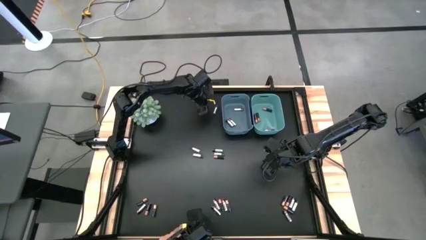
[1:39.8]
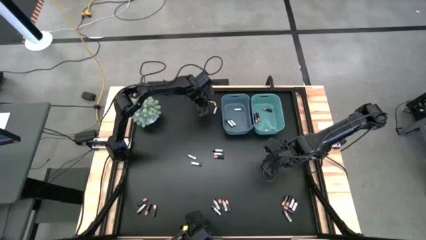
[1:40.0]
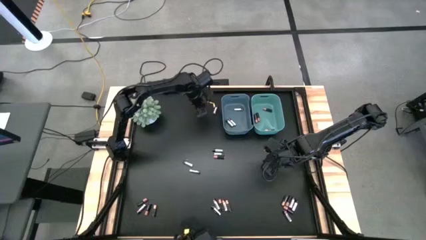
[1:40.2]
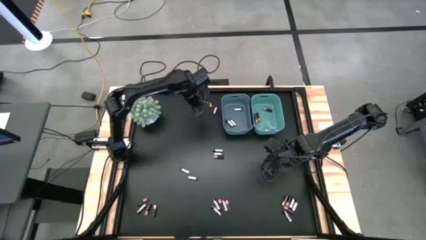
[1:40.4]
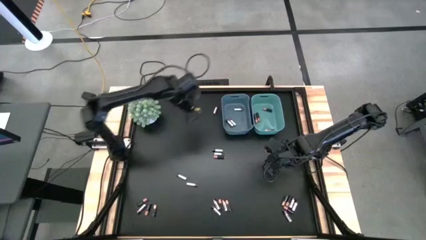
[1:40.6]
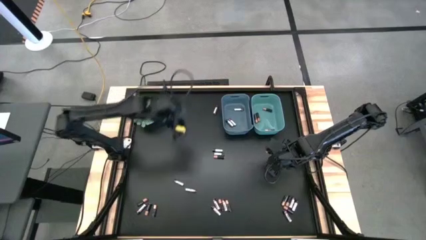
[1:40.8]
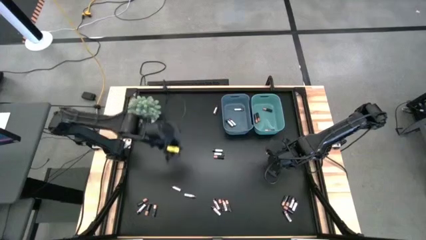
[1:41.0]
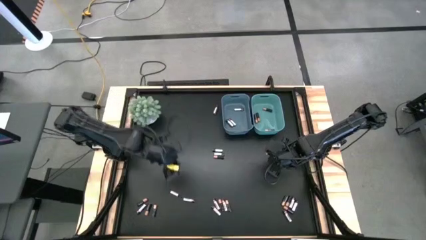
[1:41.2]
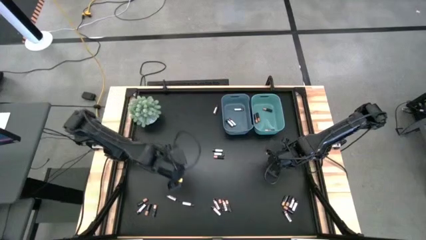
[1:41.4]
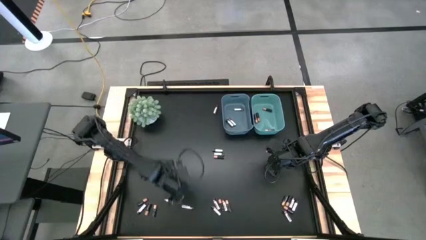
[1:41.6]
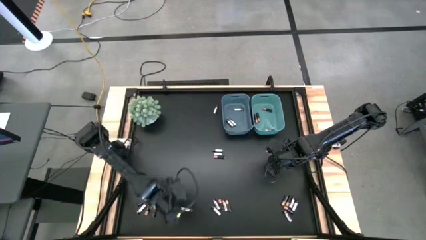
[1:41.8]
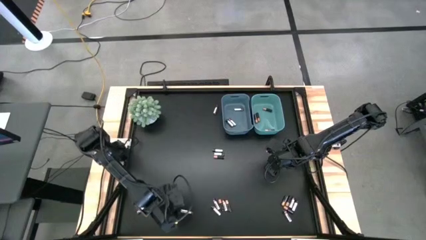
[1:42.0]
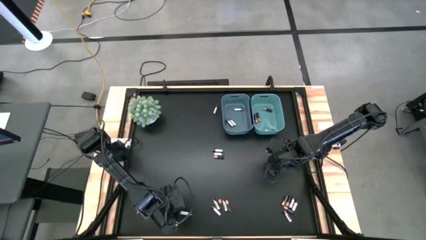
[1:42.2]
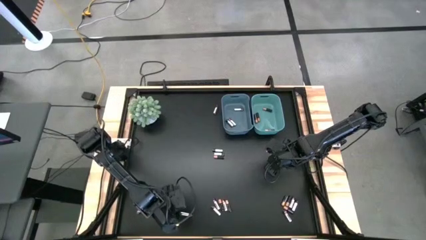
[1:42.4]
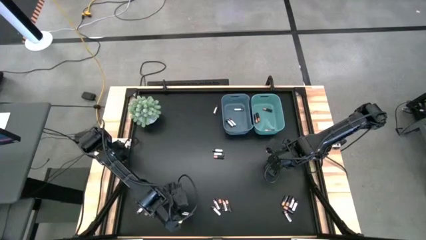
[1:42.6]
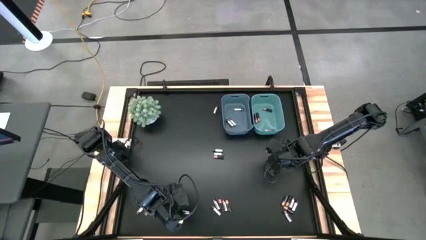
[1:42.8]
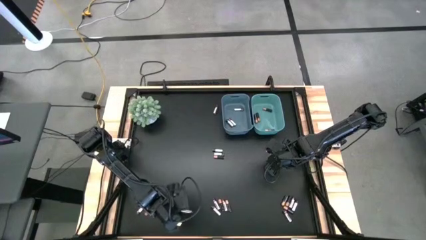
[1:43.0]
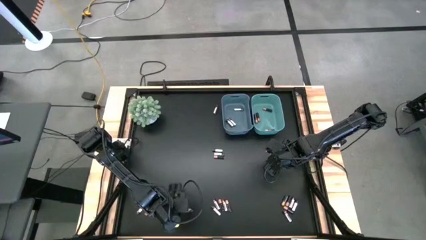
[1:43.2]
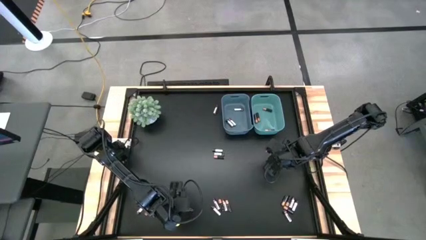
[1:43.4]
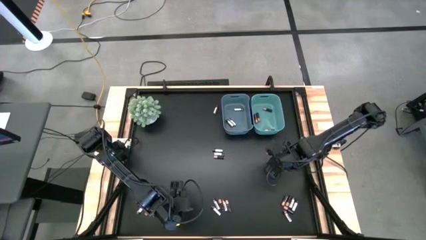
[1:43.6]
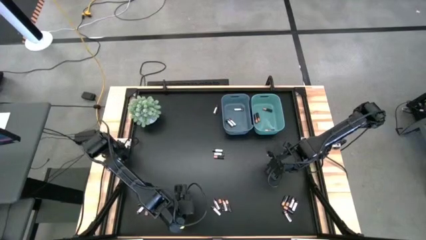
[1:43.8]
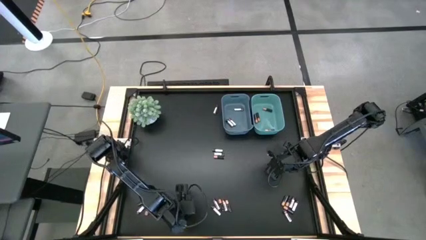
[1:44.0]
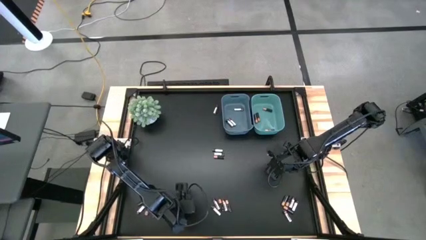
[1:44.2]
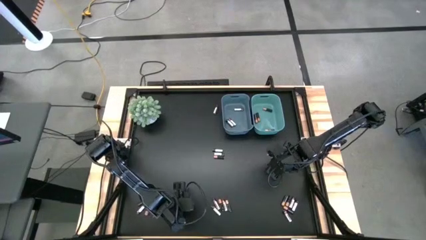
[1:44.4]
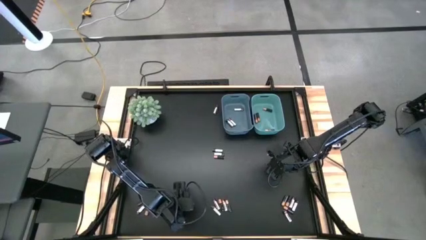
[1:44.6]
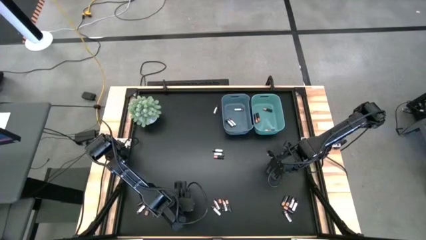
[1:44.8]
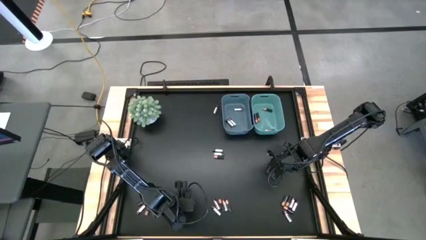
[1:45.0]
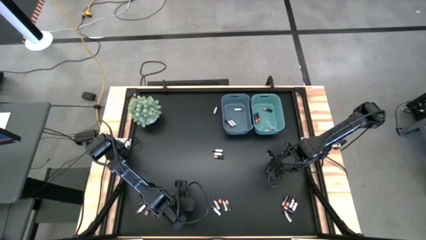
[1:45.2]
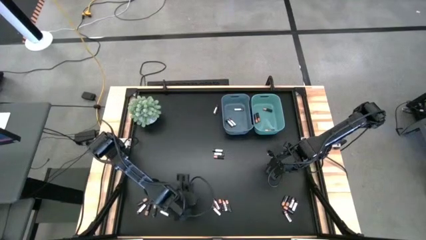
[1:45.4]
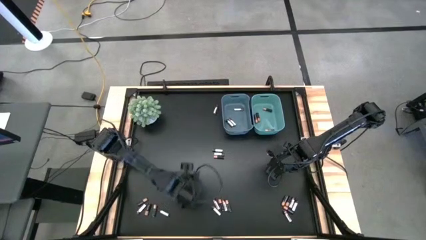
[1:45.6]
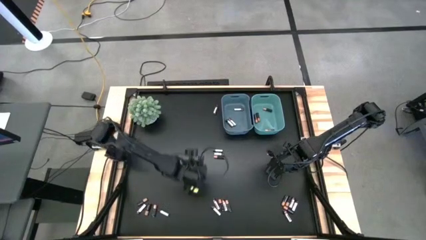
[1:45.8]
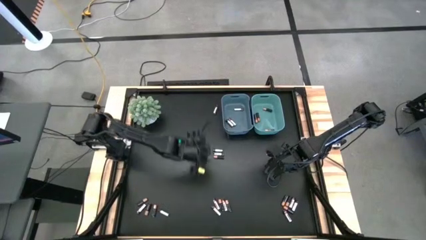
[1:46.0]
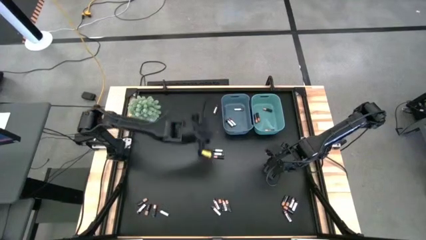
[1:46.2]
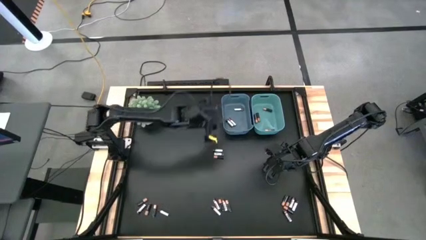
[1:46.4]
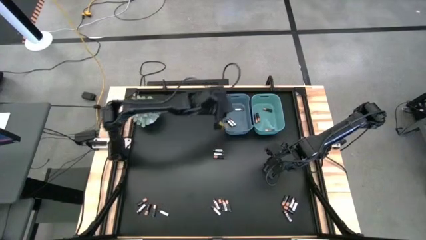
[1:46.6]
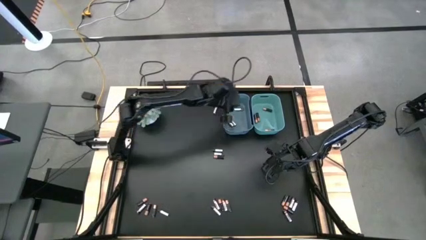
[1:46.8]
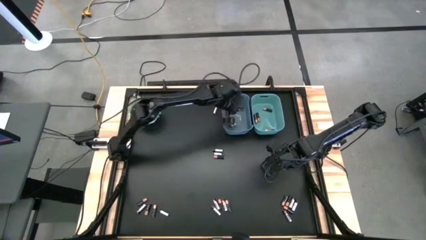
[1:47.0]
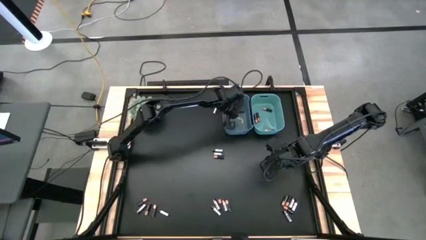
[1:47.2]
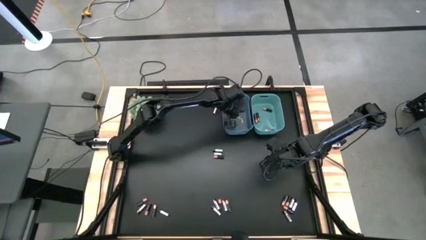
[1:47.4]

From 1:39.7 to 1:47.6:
Task: Sort batteries
Put the silver battery into the blue bin

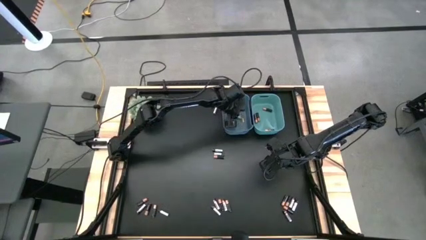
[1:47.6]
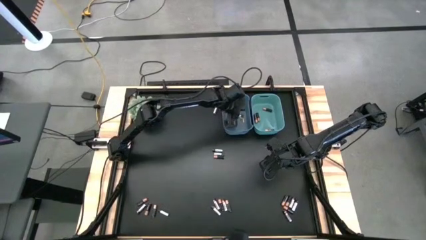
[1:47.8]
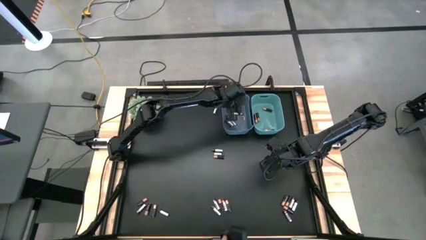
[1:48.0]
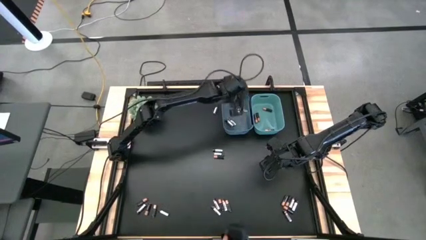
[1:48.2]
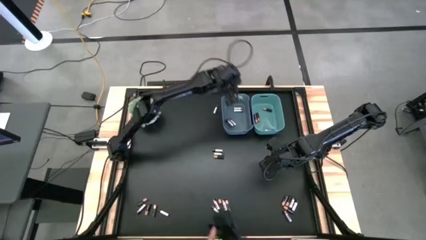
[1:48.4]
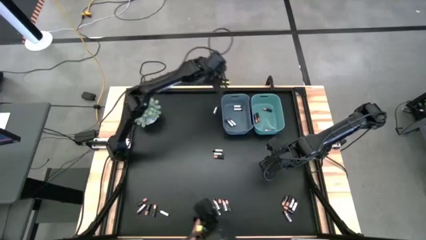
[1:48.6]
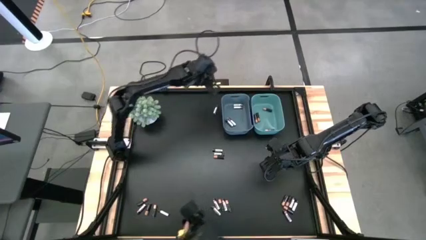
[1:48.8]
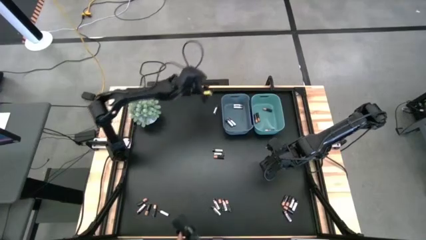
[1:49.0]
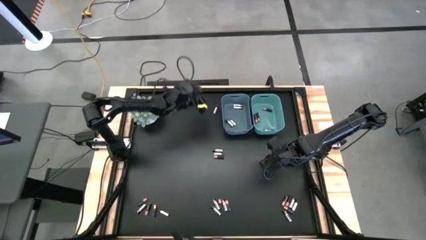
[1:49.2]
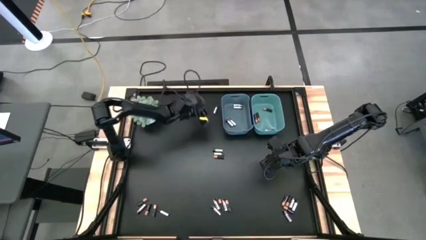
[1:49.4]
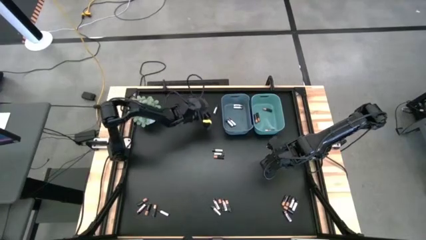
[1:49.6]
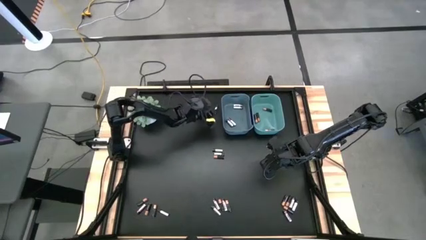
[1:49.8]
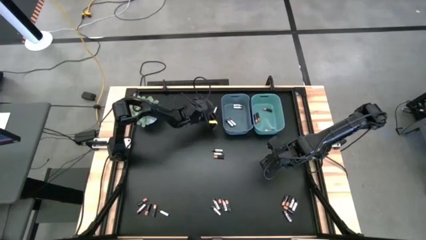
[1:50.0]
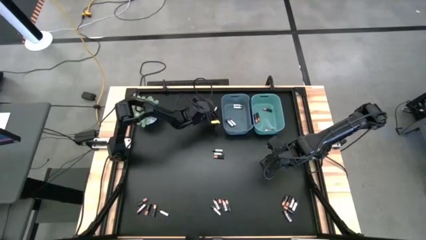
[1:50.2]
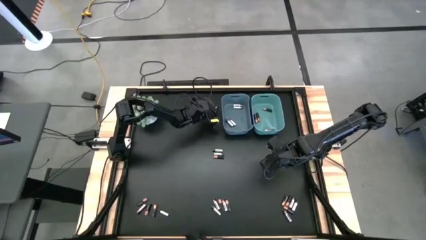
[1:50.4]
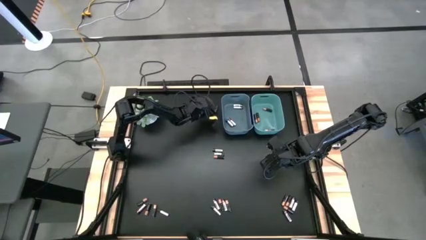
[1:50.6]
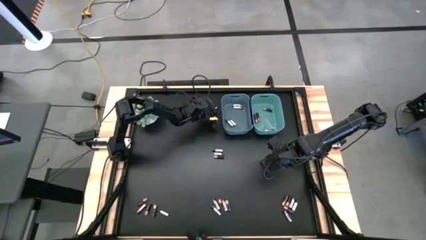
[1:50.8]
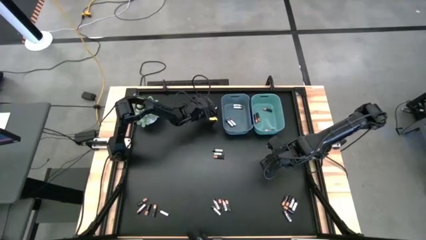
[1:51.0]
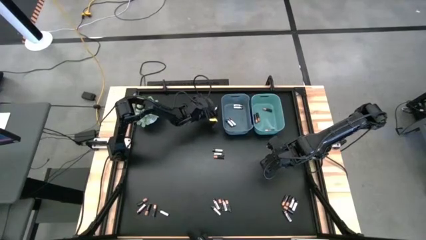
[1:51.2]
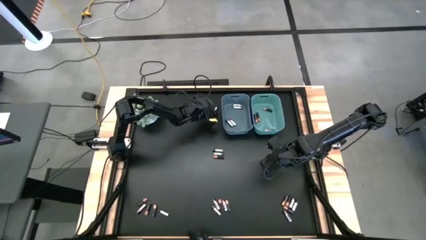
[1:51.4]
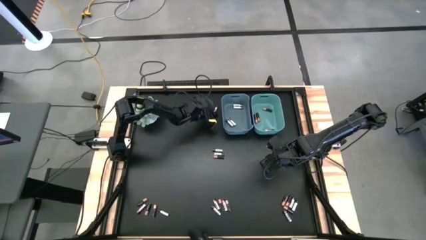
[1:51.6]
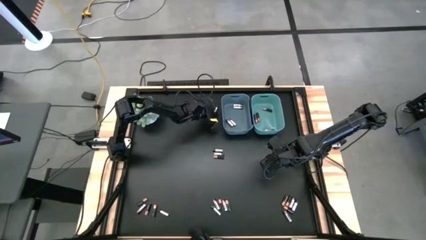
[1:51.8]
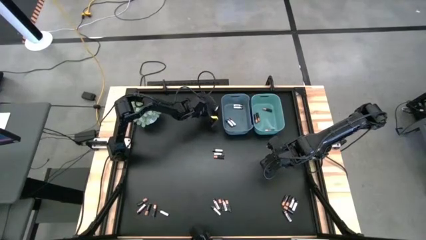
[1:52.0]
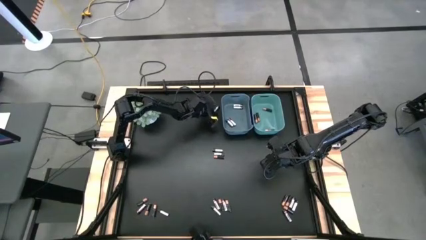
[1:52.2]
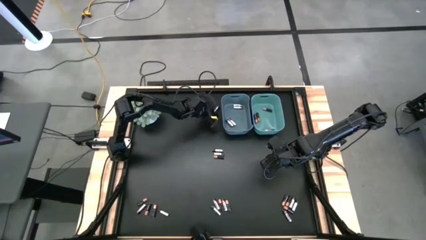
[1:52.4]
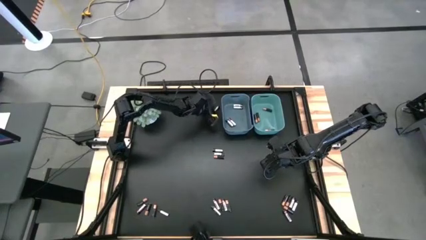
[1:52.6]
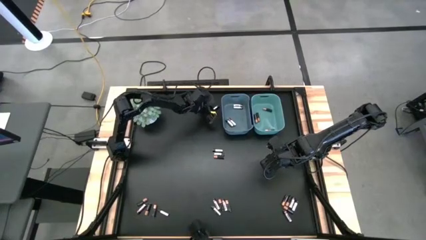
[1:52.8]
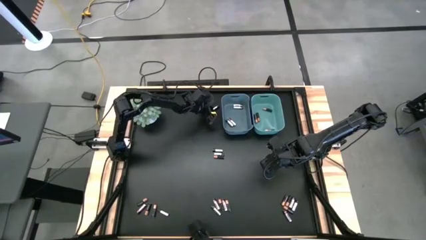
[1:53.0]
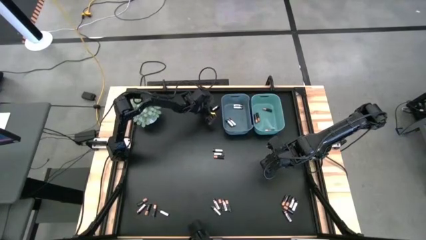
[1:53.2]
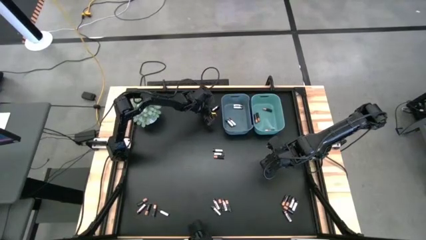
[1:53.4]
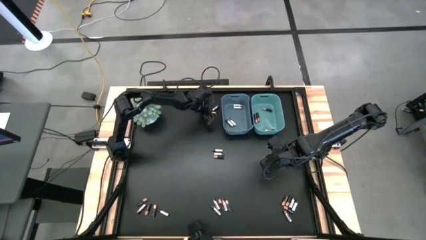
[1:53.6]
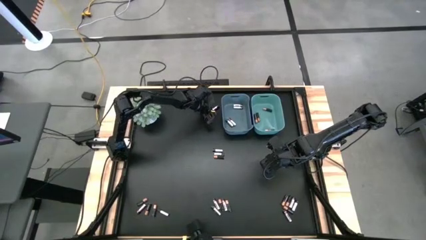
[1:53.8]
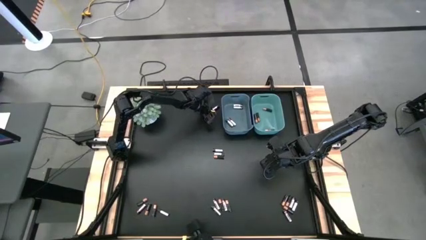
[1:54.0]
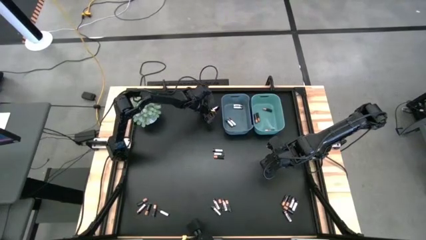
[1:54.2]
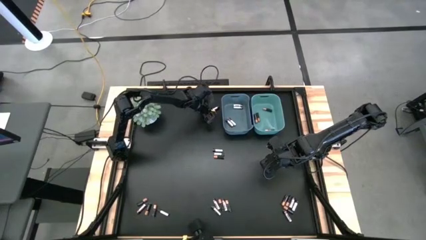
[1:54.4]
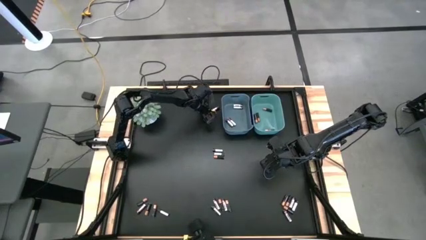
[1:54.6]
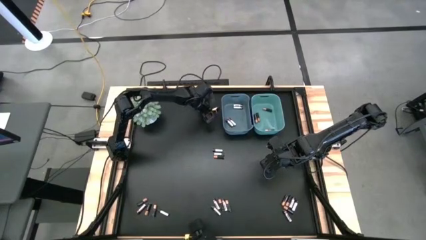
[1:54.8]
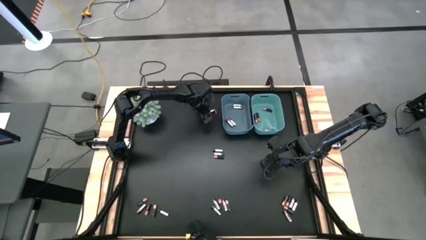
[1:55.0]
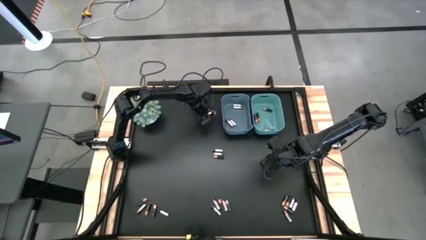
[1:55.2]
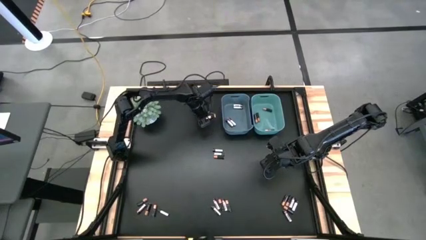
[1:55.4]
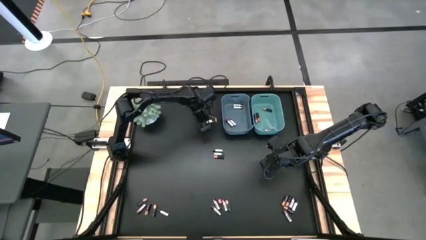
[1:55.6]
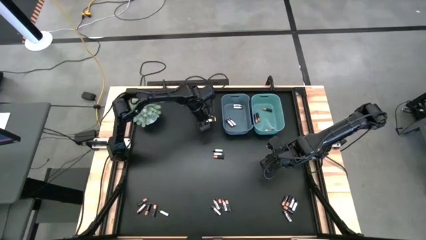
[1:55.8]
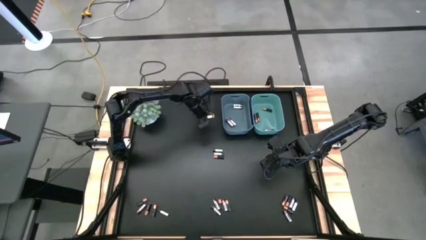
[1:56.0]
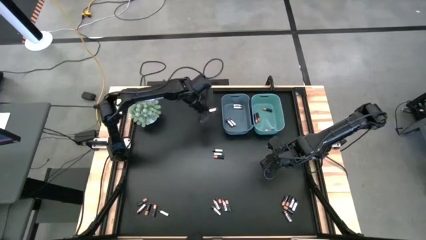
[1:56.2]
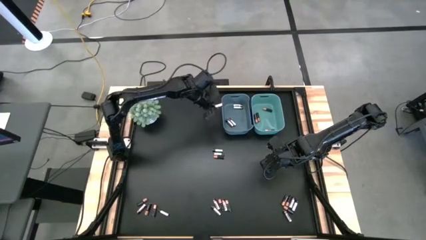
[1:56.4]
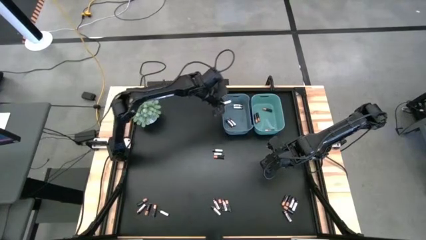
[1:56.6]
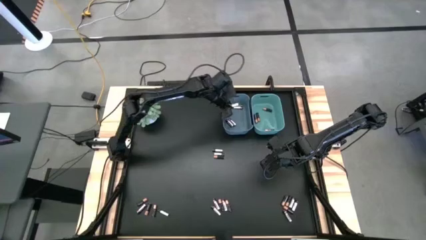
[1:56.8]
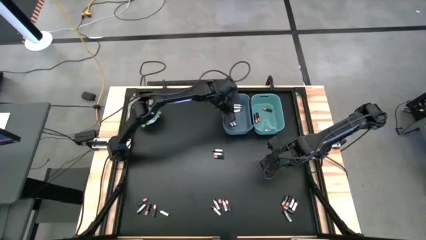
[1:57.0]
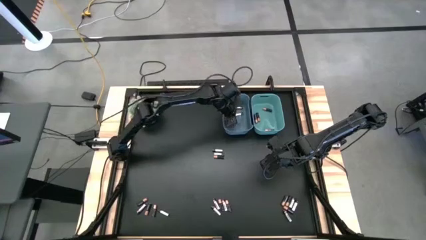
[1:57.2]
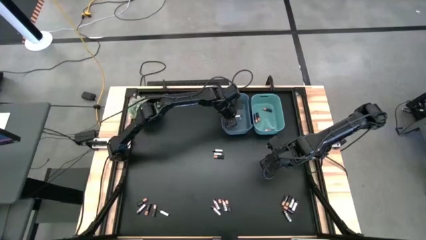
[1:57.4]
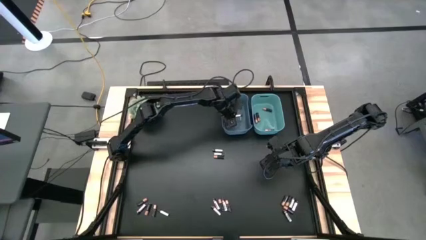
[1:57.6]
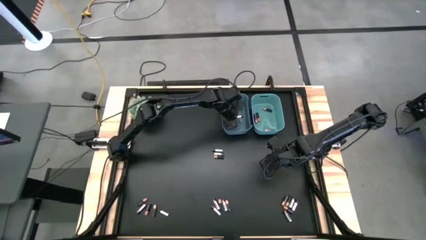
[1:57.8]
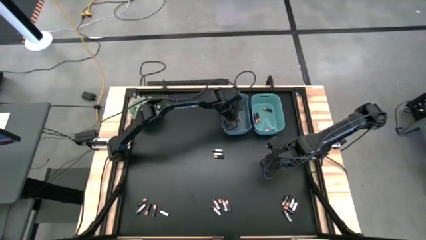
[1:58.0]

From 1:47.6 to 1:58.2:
Put the silver battery into the blue bin
